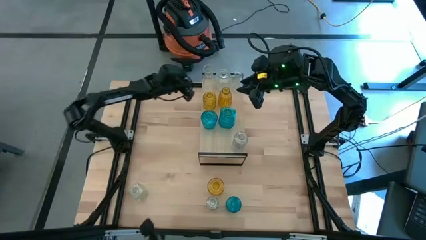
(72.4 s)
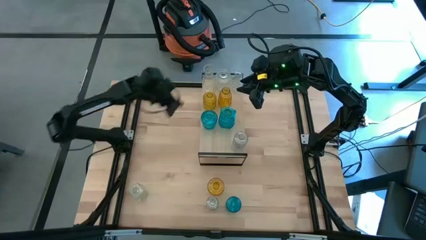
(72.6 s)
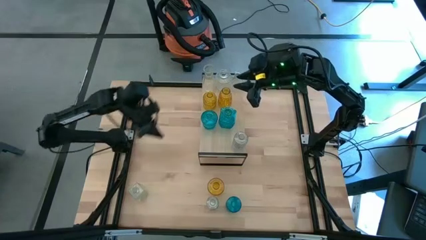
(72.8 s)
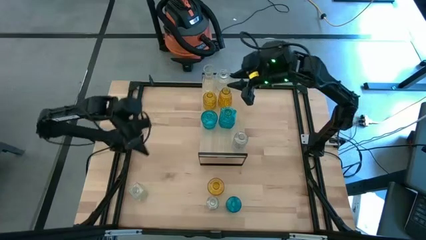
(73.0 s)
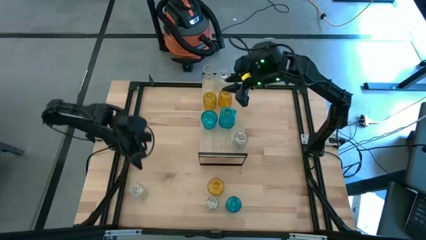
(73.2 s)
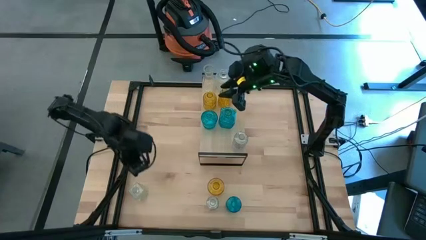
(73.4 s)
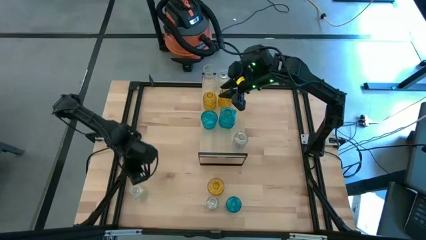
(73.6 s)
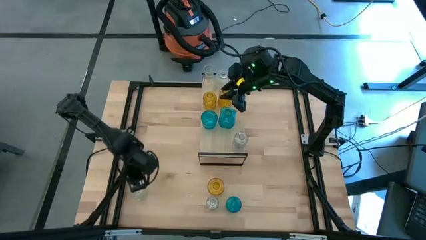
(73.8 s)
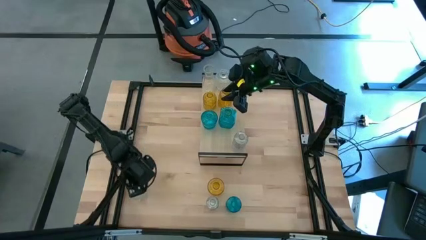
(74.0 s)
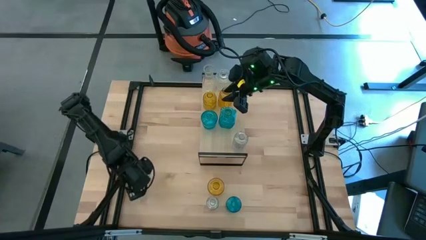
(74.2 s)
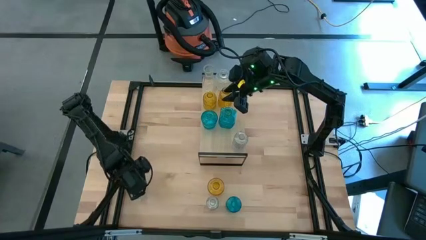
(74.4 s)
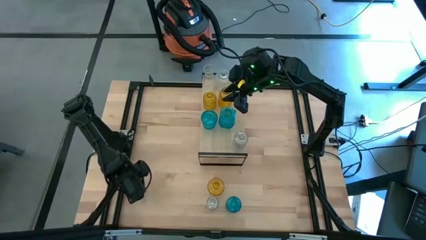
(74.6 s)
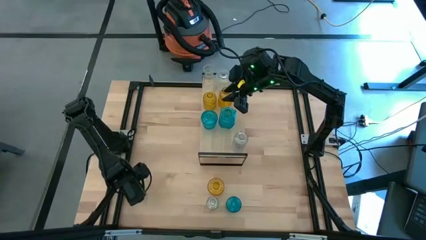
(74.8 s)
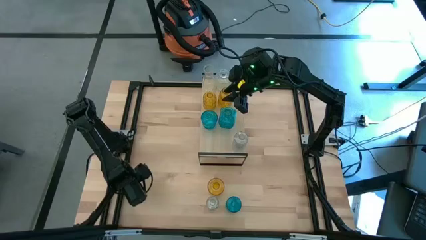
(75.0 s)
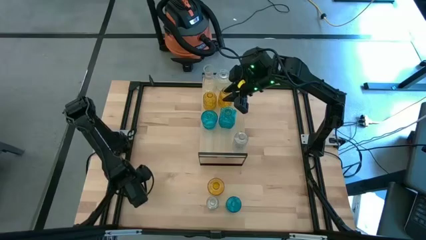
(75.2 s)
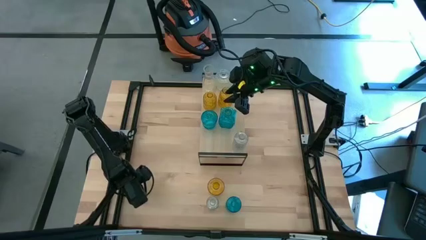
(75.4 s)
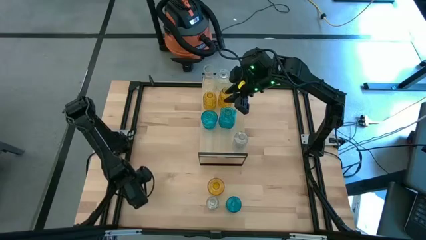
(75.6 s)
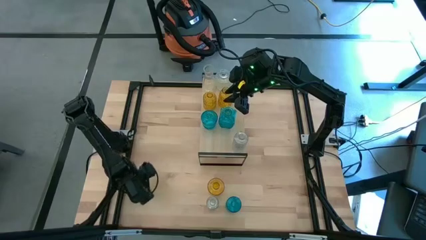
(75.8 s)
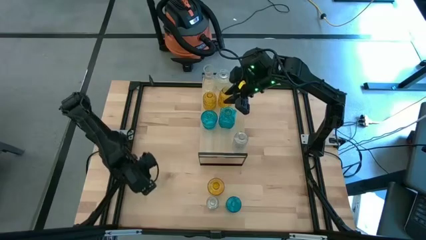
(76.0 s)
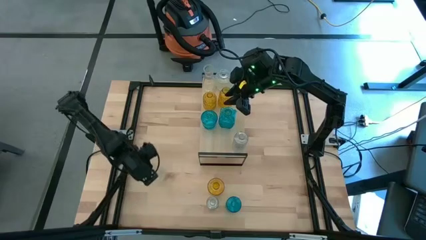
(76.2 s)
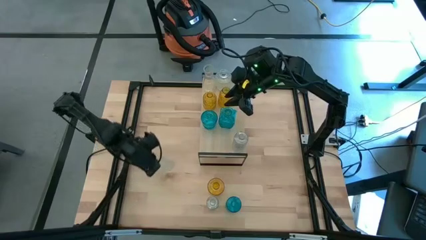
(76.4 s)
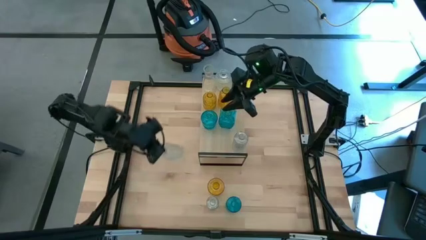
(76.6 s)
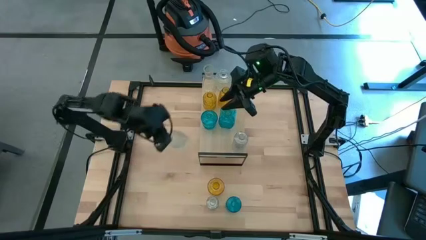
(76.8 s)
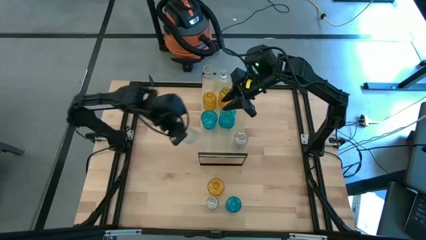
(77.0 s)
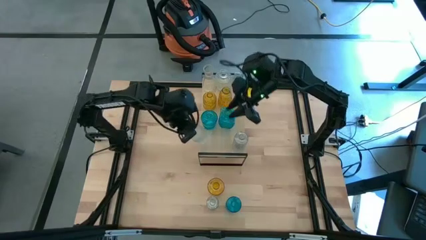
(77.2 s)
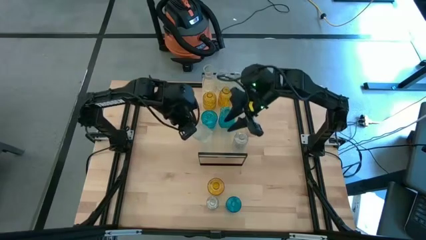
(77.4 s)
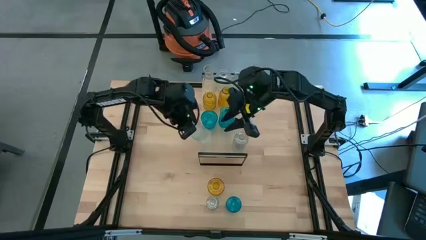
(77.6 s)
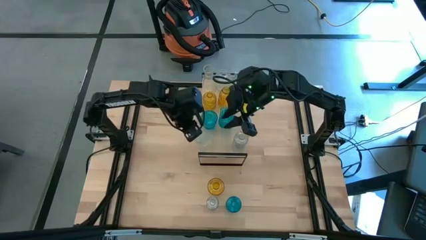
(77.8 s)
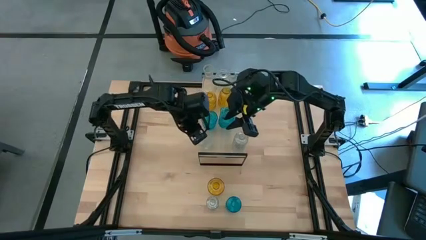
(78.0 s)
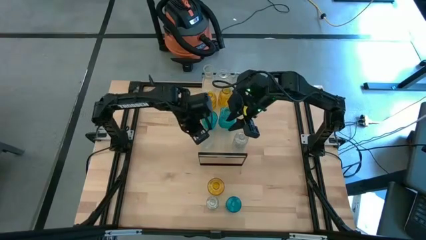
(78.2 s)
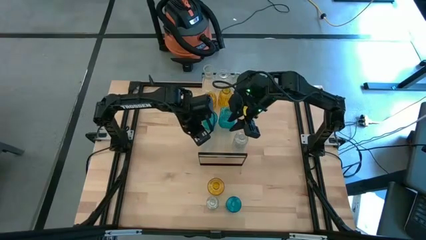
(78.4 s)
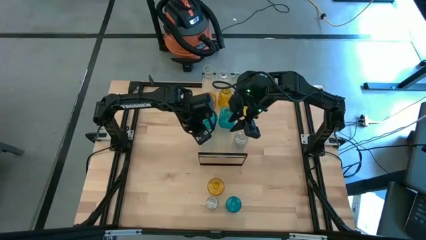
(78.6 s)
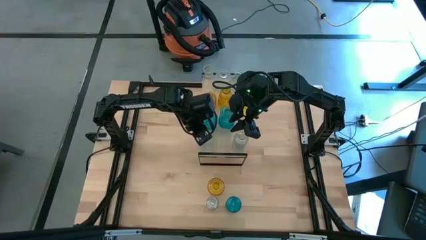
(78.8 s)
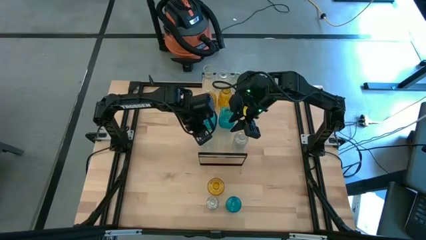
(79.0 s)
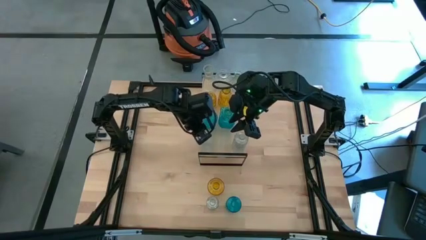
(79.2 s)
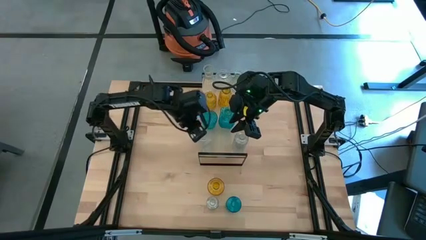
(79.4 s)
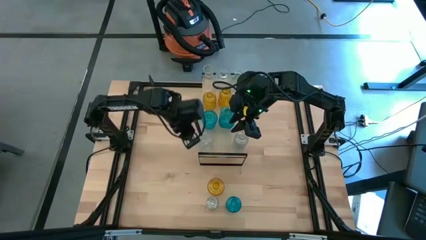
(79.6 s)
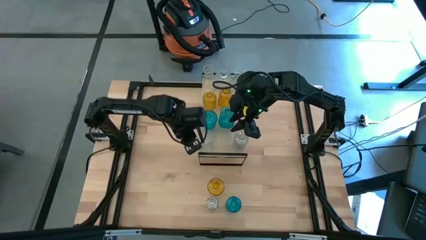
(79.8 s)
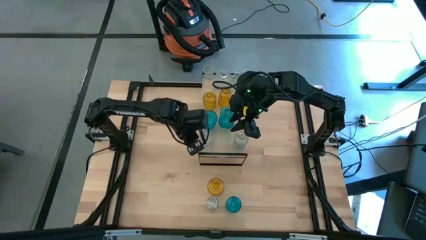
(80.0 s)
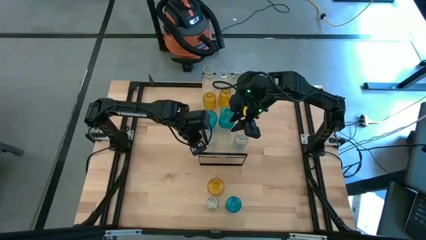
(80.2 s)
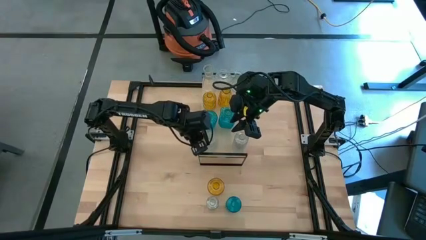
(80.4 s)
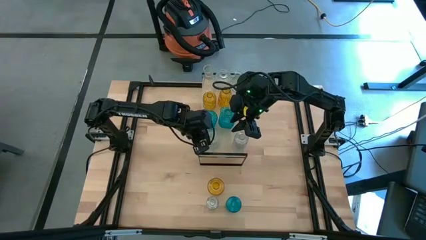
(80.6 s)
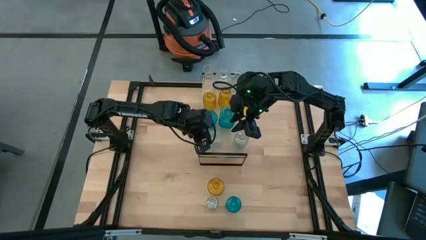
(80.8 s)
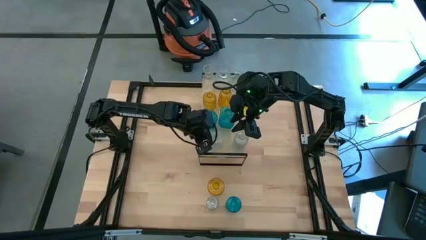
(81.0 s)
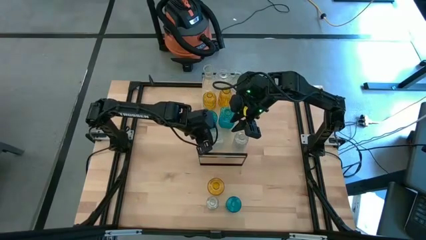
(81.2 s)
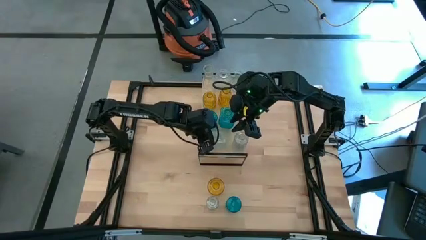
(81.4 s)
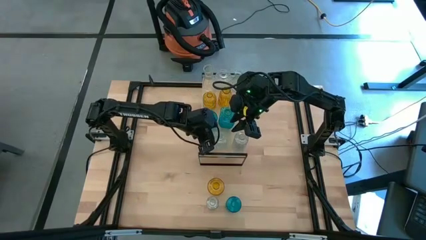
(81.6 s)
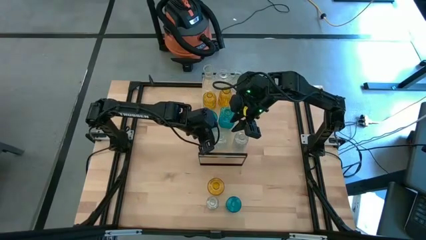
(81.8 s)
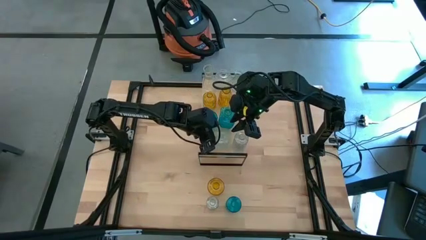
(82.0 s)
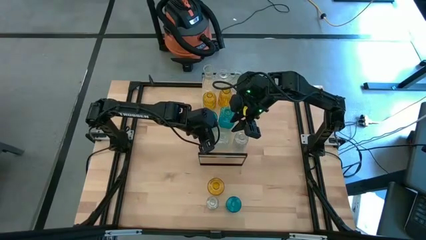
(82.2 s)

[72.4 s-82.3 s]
Task: sort vases onto shelf
Put the transparent vase on the shelf aligned with the other transparent vase

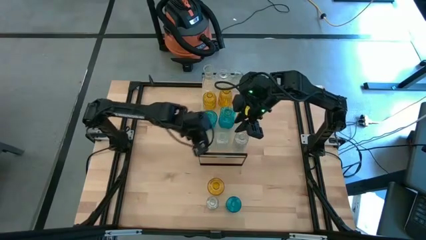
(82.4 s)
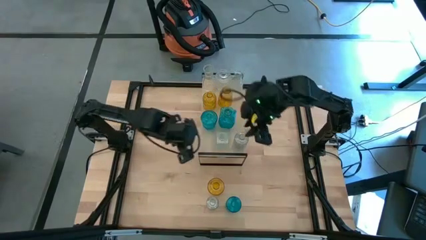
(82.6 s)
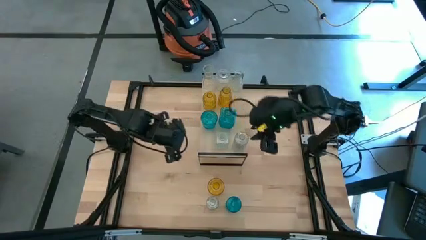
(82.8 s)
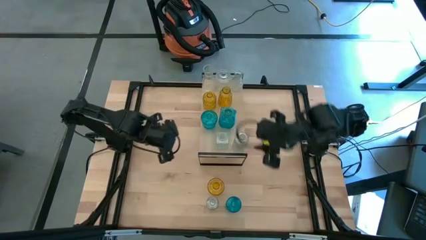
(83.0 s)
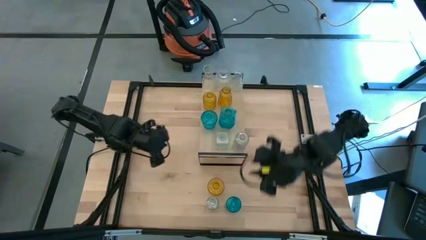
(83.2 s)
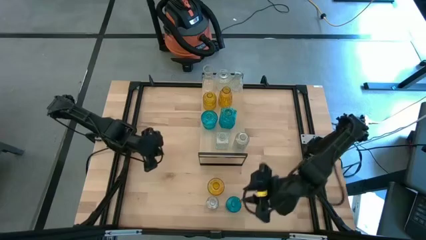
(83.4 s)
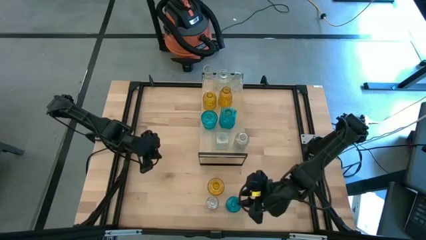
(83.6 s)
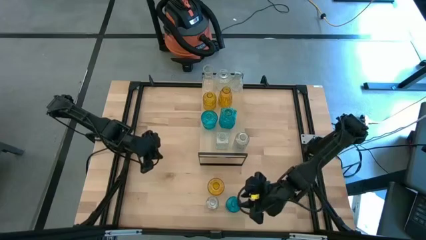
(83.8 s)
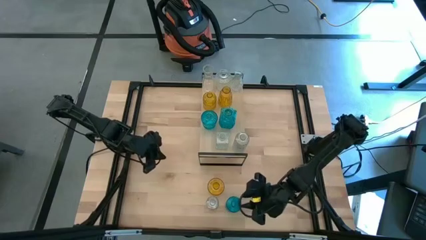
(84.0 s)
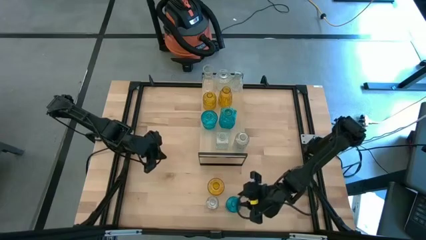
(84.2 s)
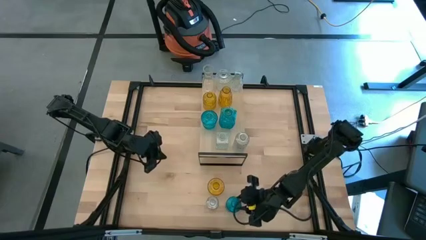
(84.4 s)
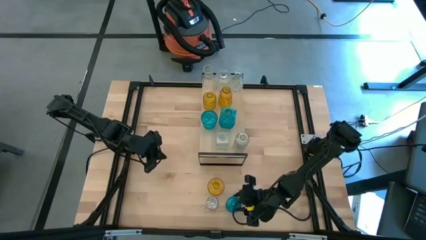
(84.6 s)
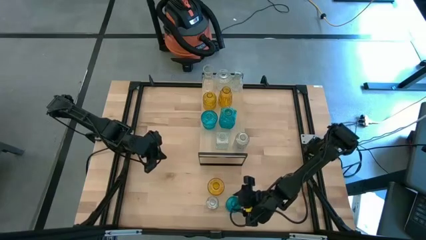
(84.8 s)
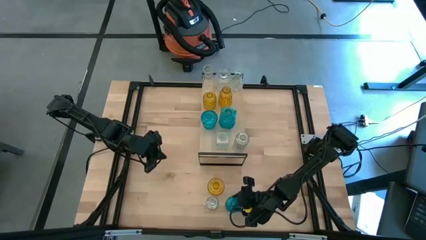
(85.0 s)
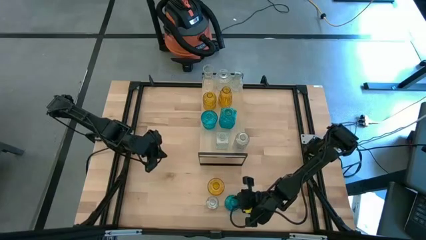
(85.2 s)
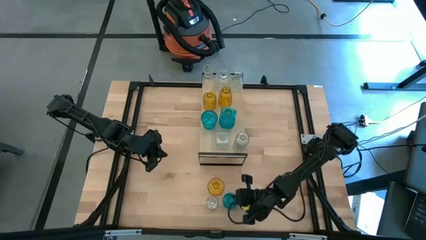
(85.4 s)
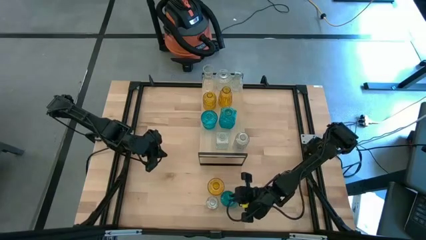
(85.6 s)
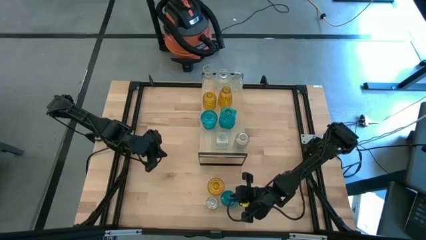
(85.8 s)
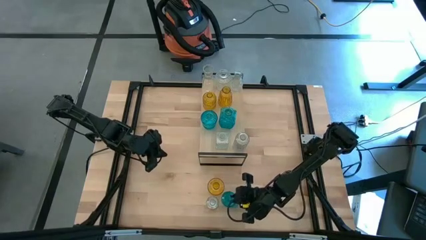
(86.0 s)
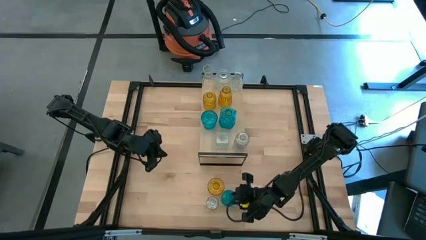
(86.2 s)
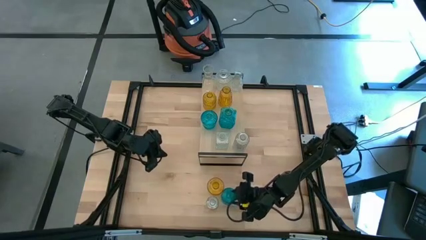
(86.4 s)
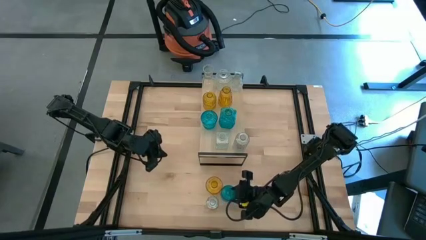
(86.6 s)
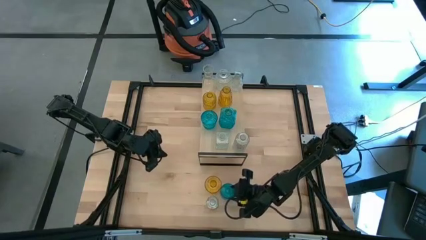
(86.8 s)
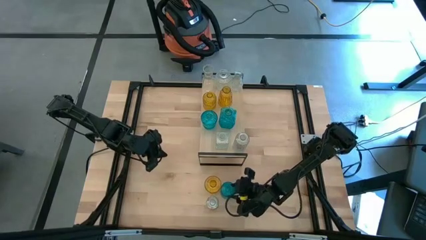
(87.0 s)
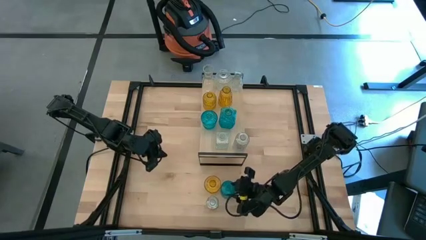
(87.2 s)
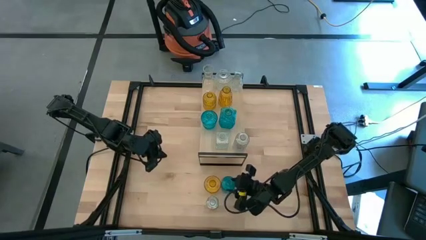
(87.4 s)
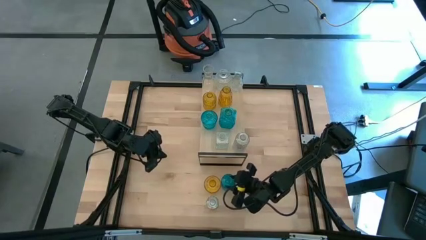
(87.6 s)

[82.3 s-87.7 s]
Put the blue vase on the shelf aligned with the other blue vases

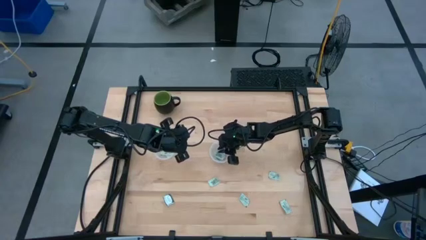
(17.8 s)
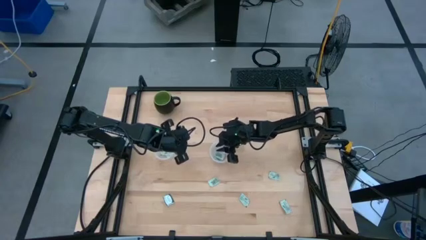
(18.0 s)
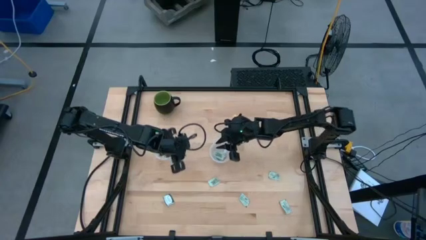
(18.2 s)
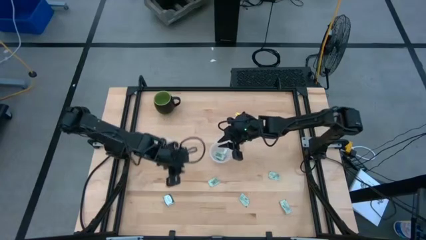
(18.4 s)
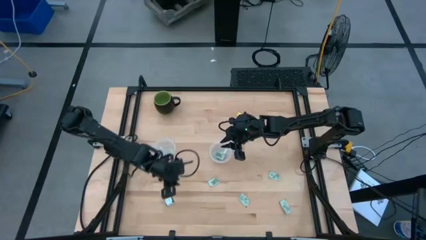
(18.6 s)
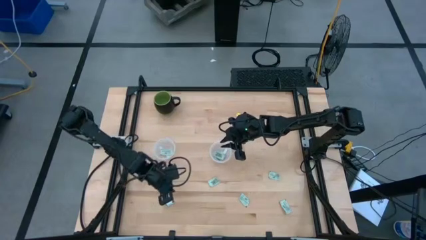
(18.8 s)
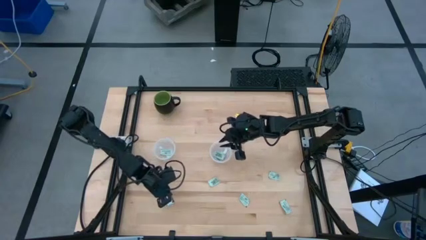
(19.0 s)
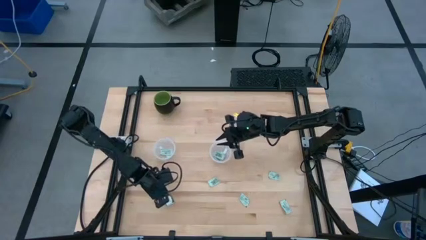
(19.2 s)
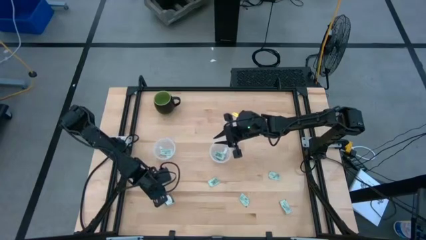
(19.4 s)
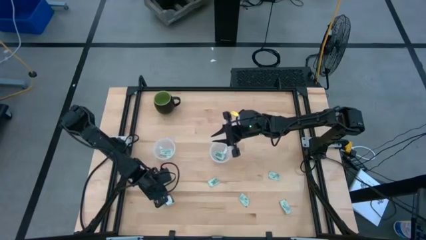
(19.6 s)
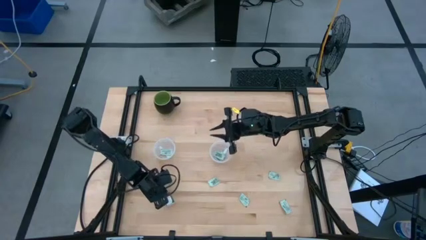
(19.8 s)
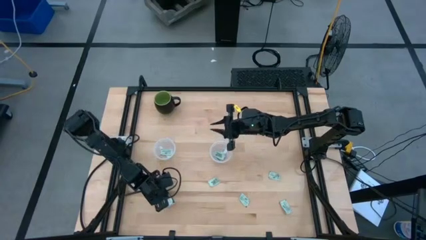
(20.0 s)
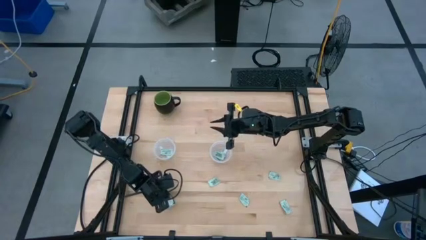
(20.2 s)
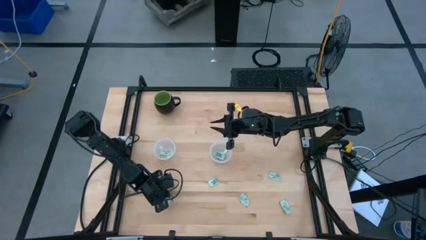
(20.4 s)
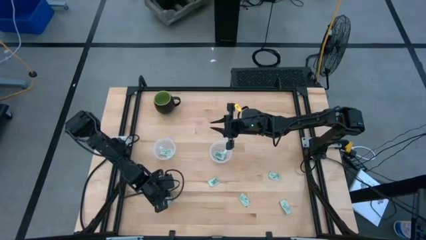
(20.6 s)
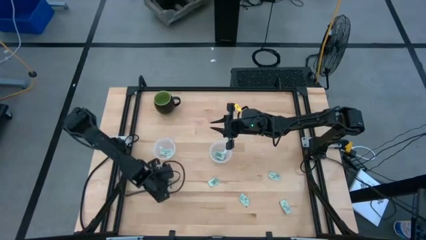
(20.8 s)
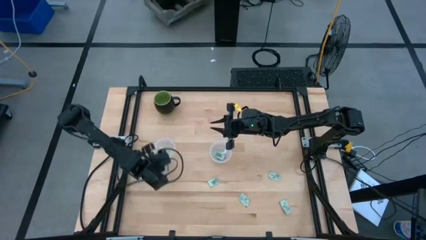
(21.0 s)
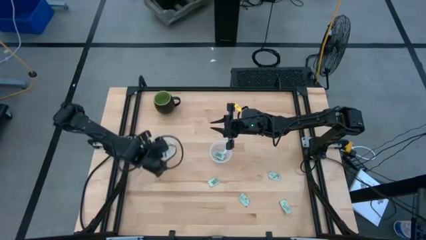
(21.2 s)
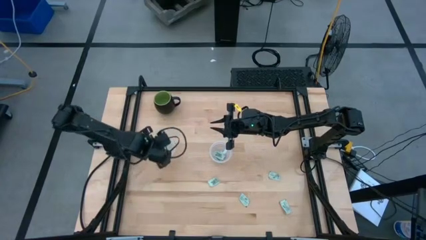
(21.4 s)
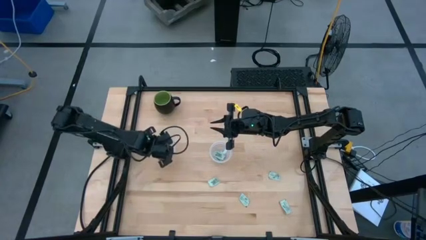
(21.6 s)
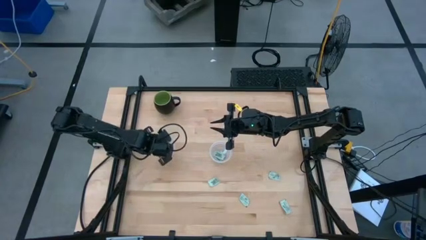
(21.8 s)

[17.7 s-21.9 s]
Task: Pick and place Stevia / Truvia into bins
Put the green stevia packet into the left transparent container
